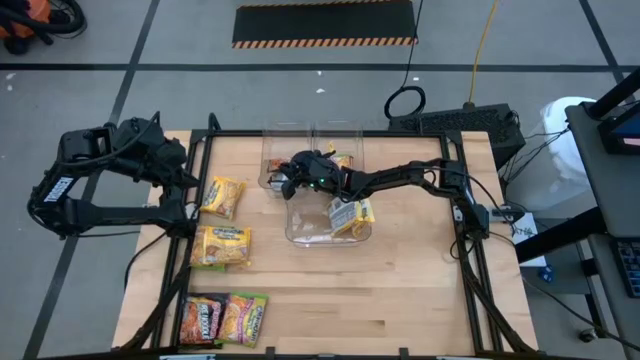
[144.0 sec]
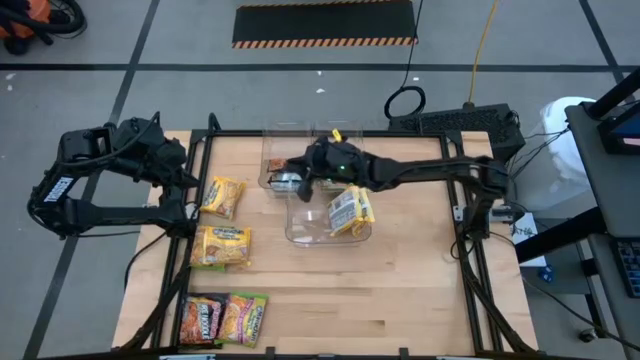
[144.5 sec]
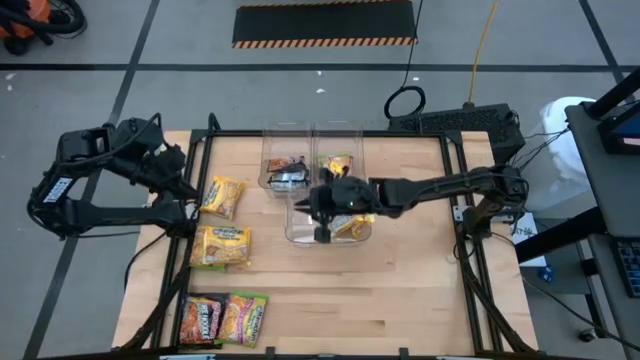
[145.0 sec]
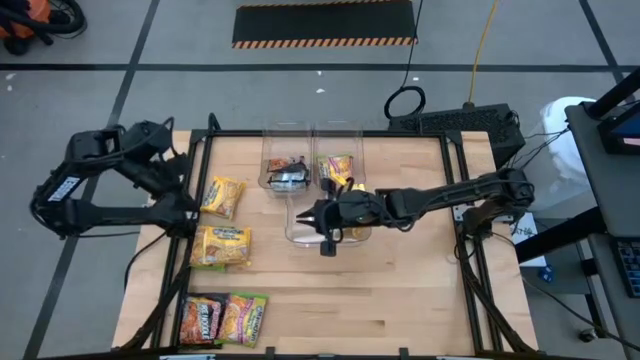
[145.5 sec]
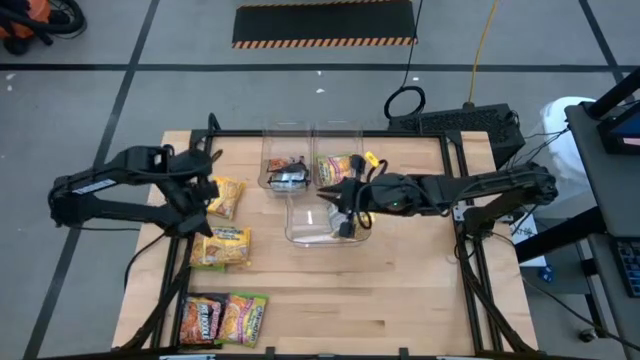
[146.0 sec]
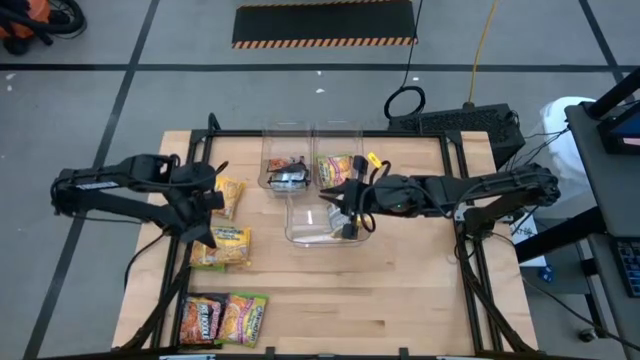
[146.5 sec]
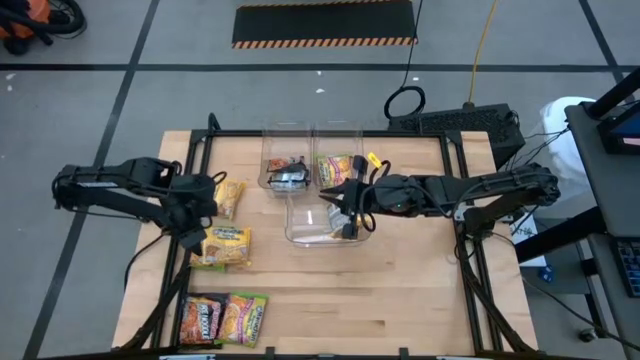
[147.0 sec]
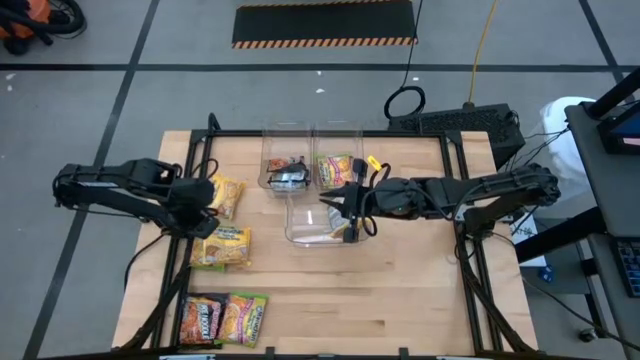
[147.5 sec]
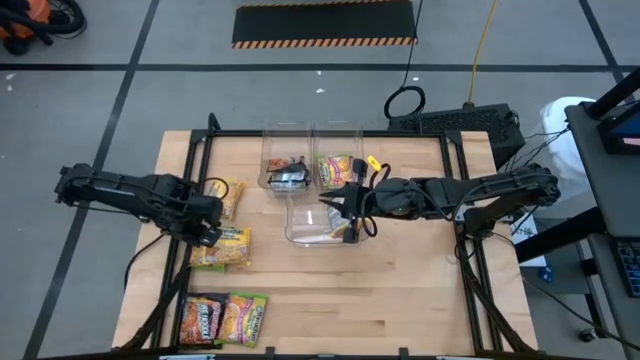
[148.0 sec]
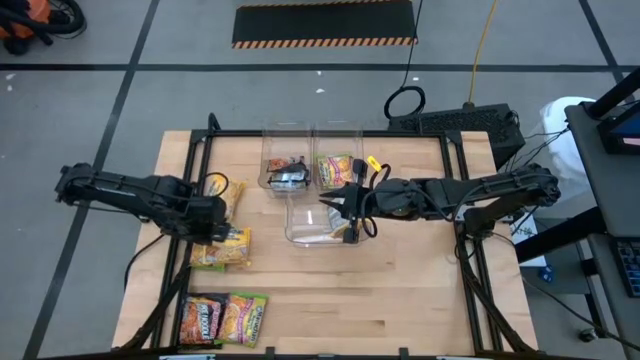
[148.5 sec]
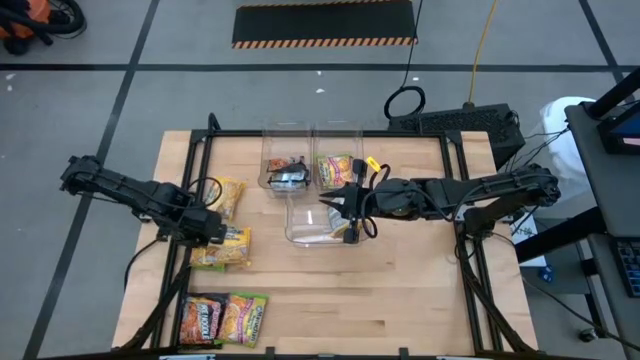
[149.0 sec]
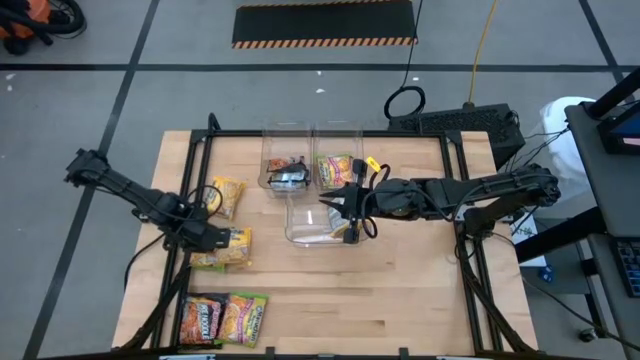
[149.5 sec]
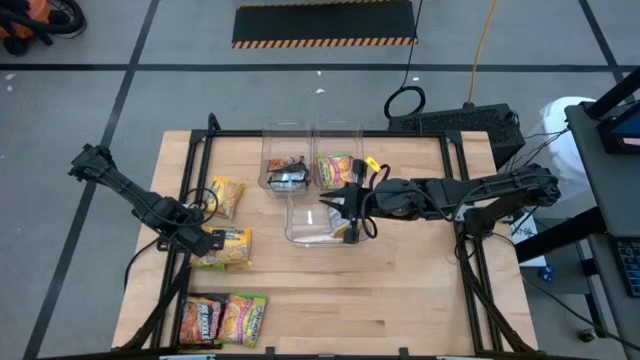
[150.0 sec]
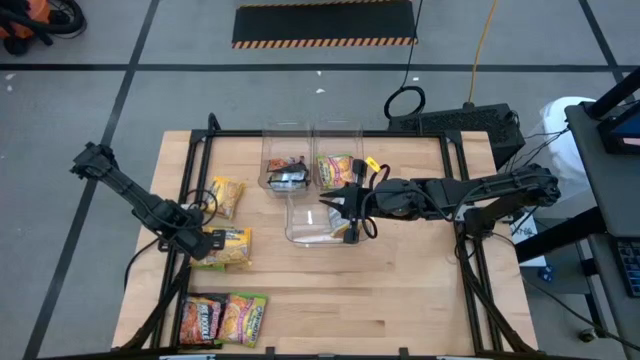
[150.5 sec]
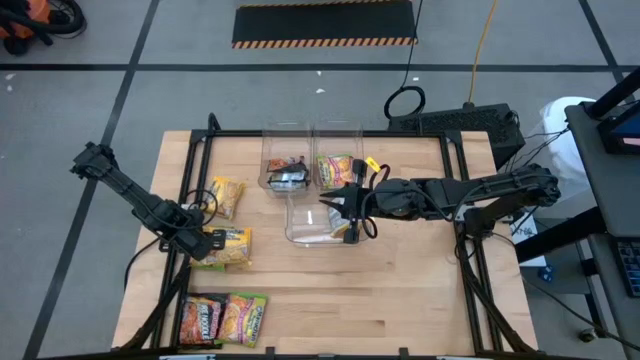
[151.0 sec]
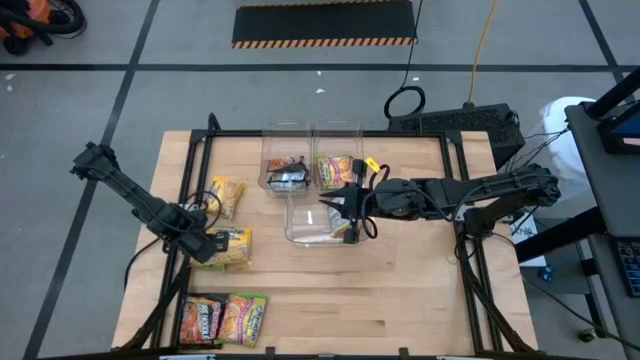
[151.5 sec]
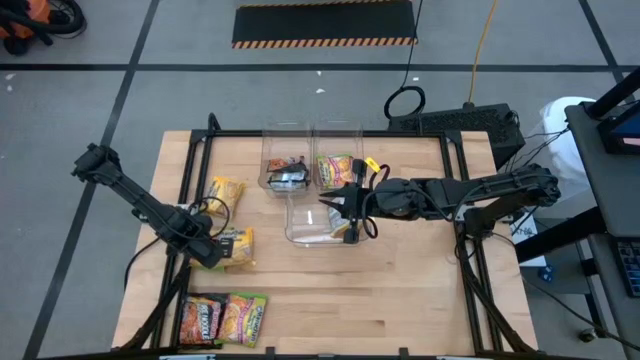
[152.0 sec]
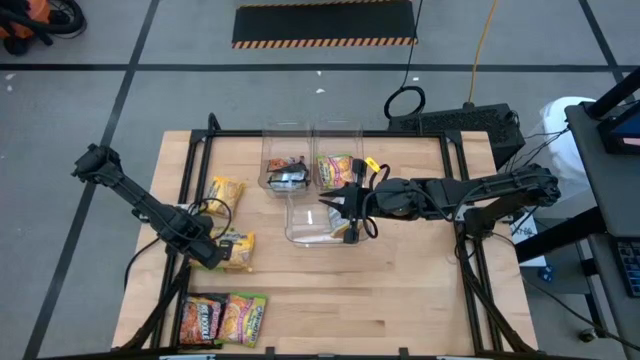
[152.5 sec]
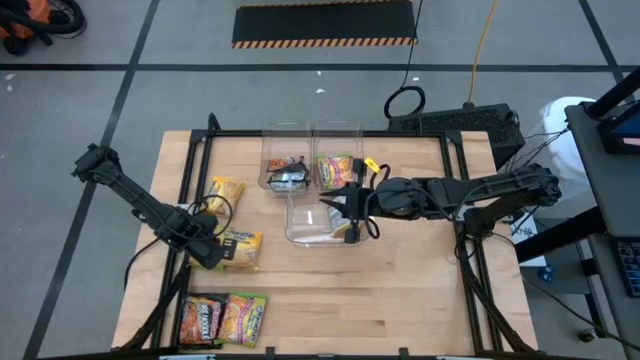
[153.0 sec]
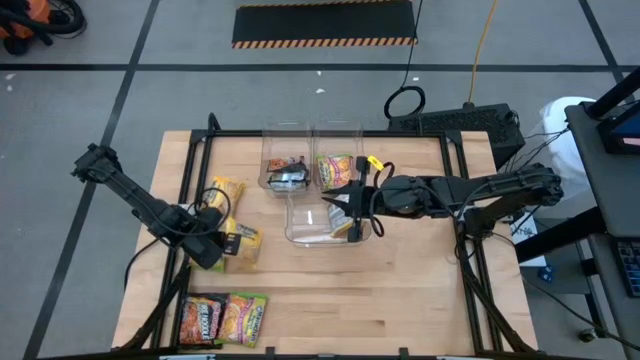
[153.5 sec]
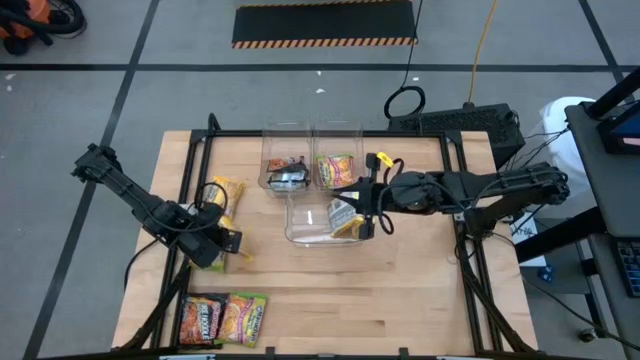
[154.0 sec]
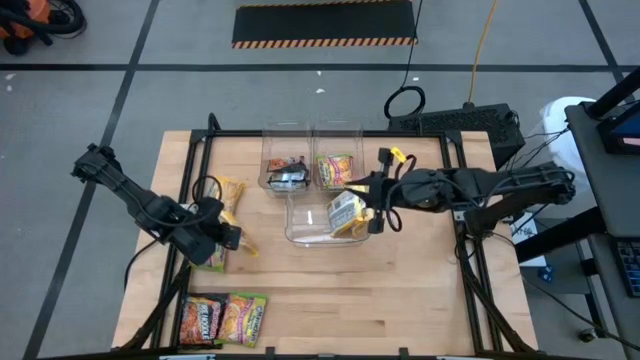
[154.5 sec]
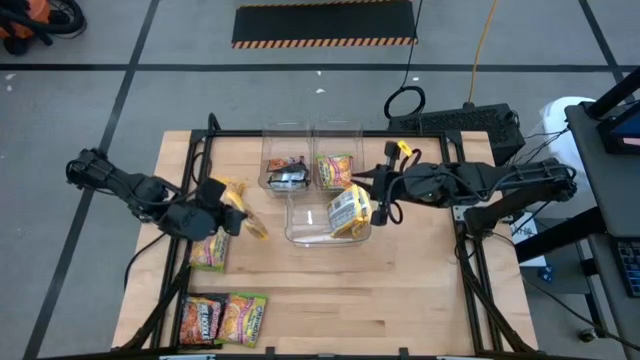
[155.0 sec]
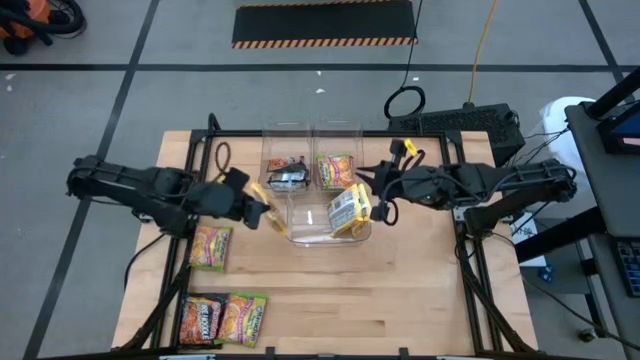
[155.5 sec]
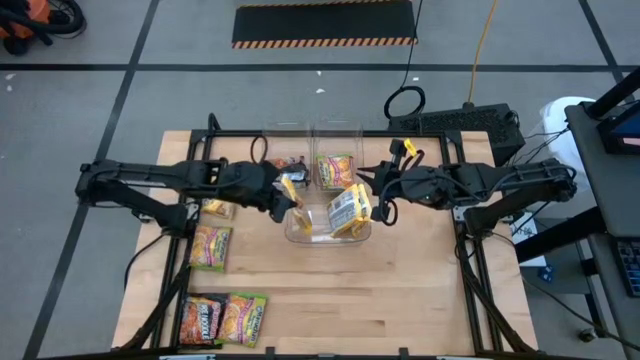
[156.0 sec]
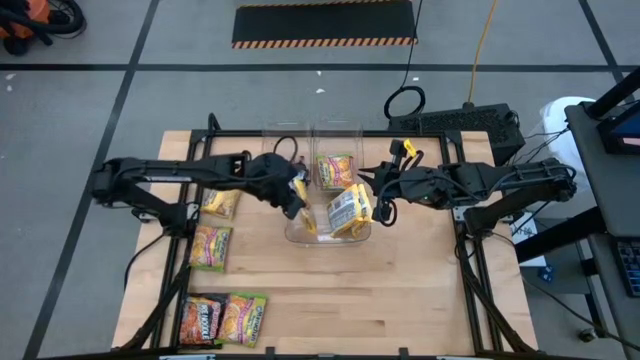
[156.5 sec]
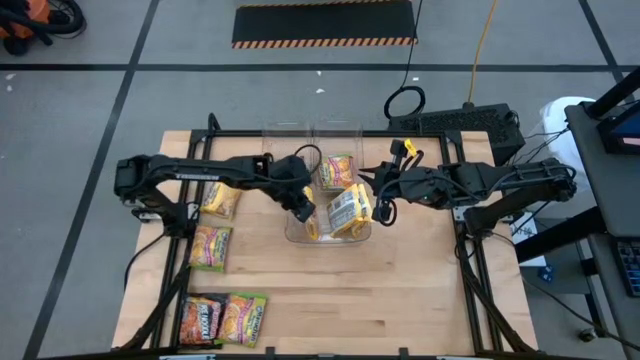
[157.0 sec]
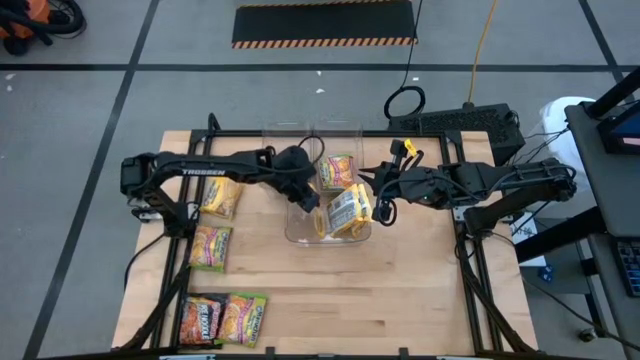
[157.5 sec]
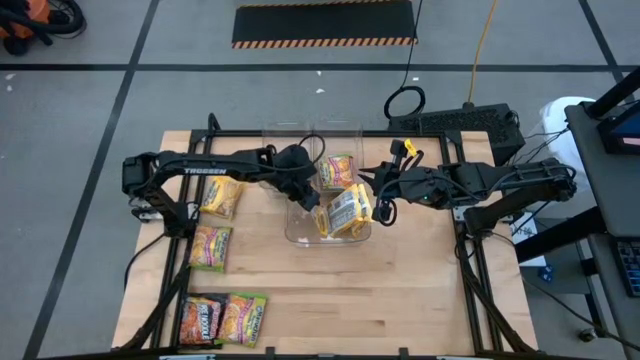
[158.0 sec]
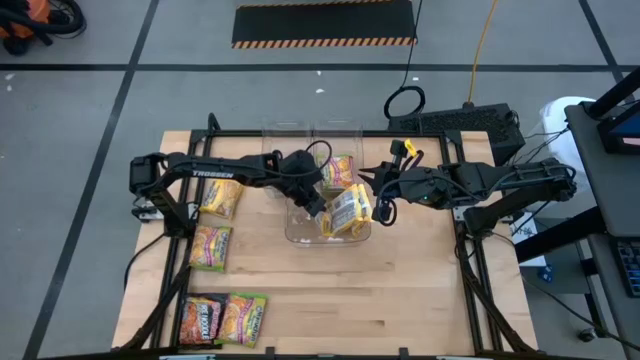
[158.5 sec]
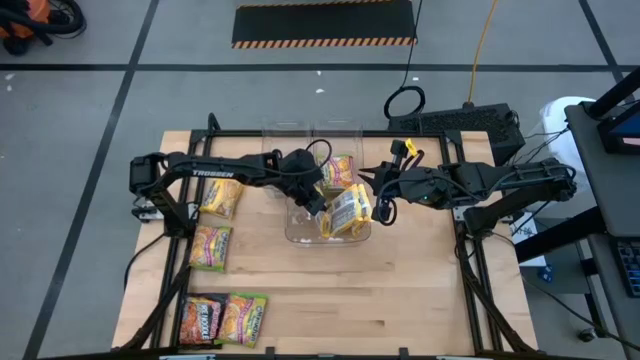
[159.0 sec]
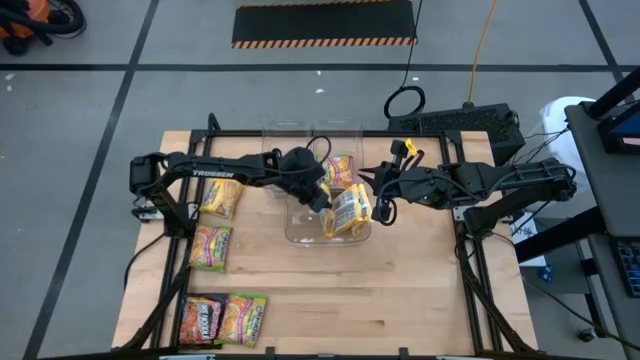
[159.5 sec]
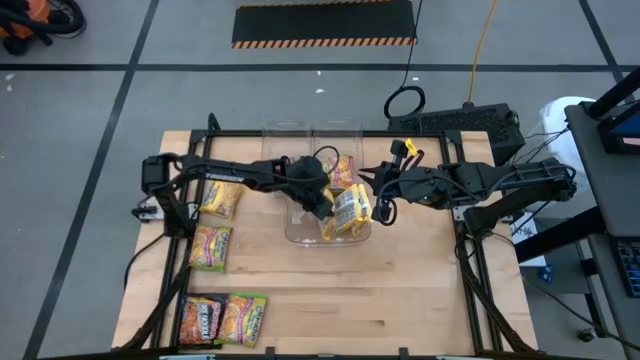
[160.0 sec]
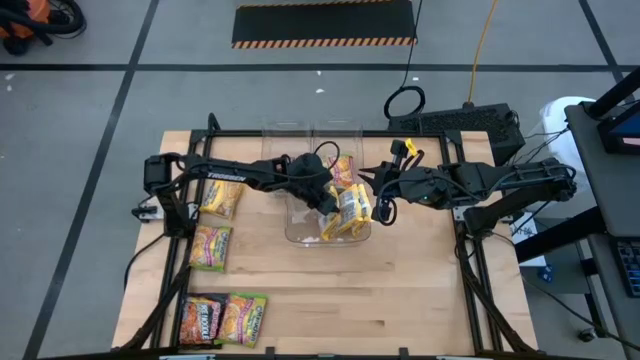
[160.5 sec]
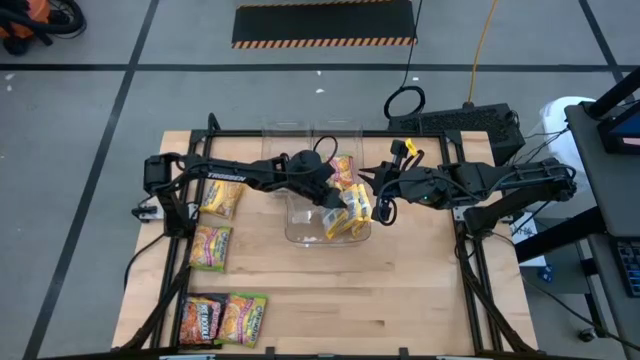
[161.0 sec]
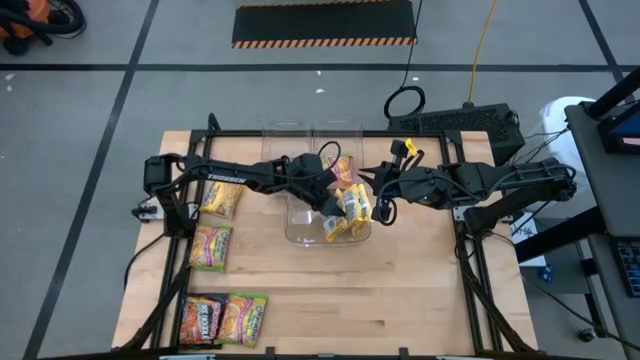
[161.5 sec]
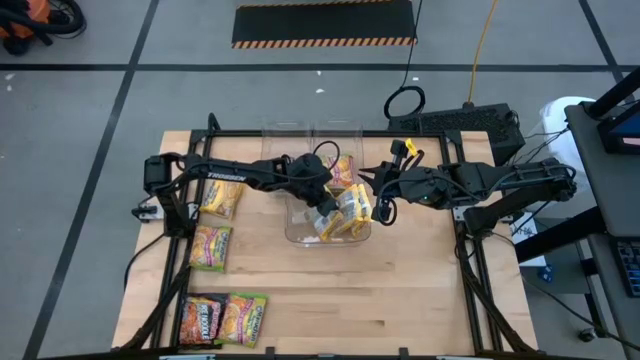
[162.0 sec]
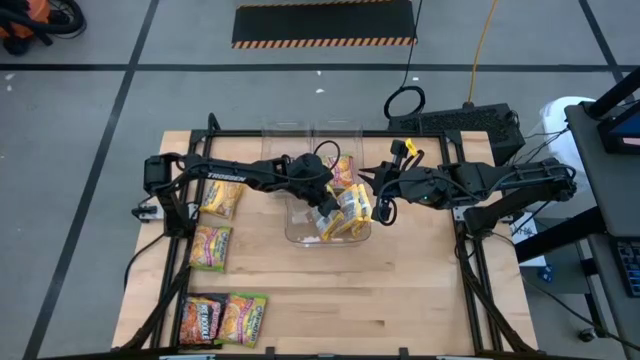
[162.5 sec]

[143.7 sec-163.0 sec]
Task: Sort Maruchan noodles
Put the yellow noodle pack into the bottom transparent bin
